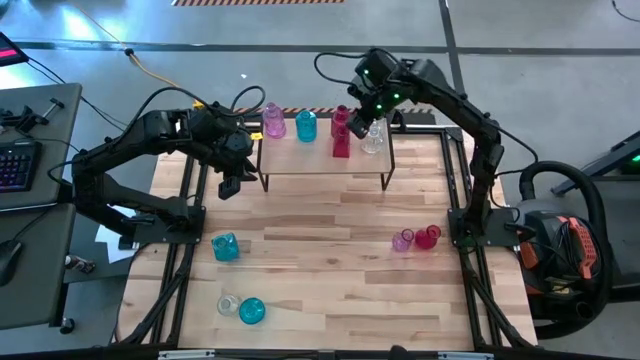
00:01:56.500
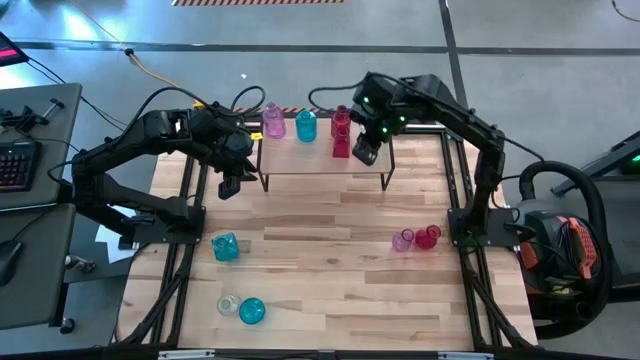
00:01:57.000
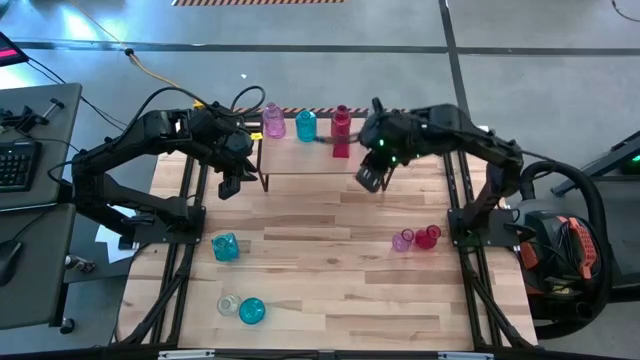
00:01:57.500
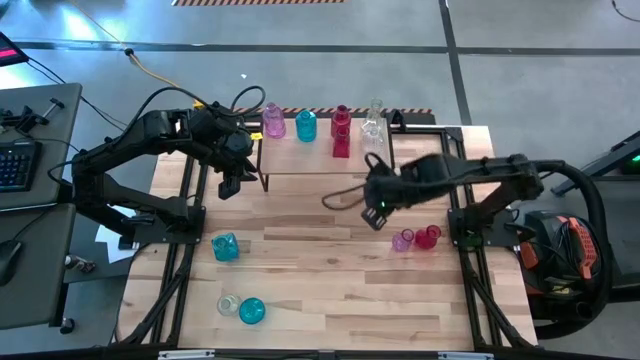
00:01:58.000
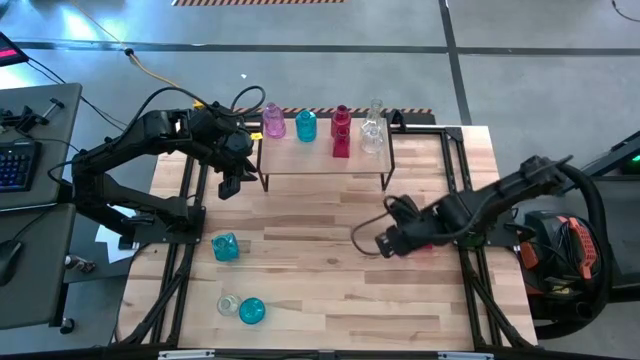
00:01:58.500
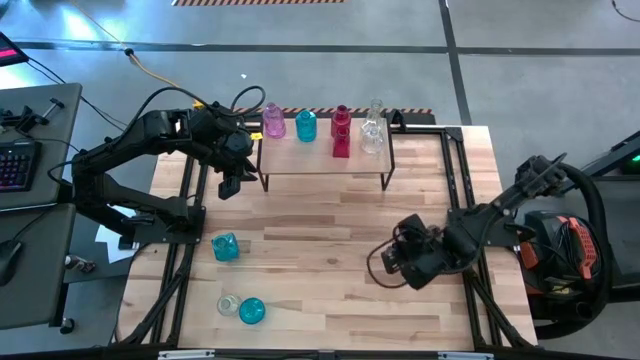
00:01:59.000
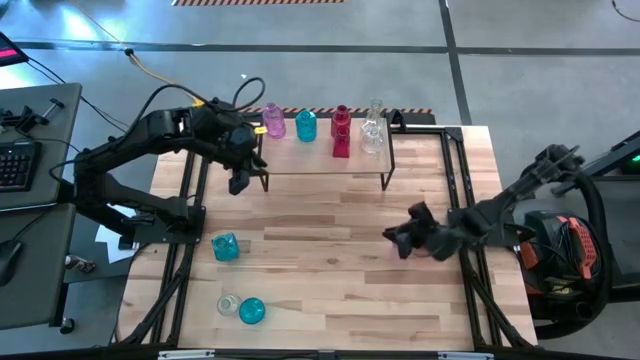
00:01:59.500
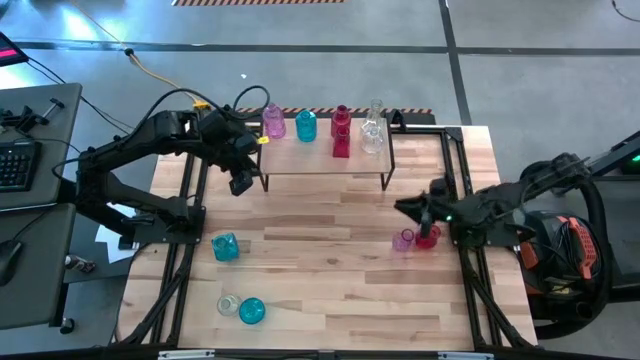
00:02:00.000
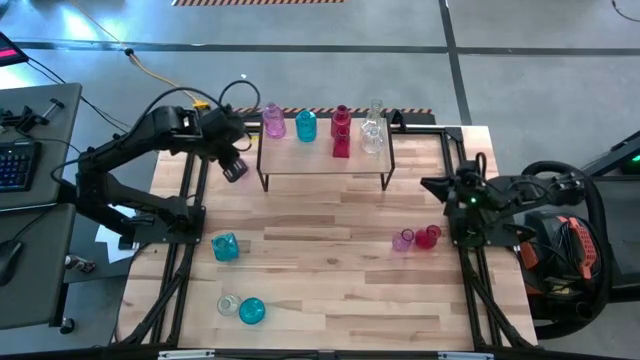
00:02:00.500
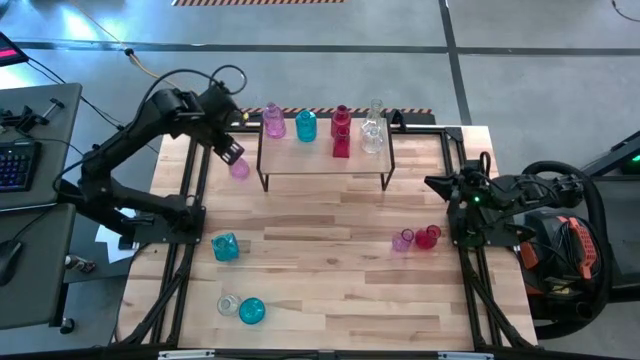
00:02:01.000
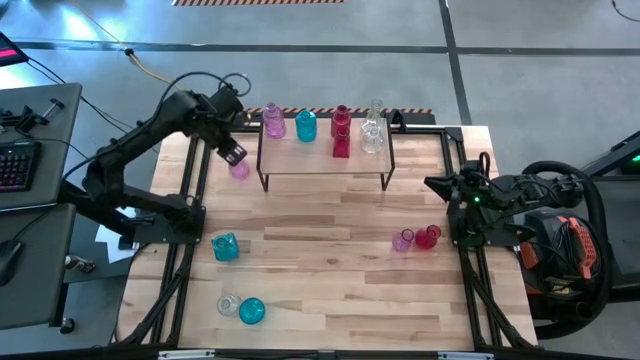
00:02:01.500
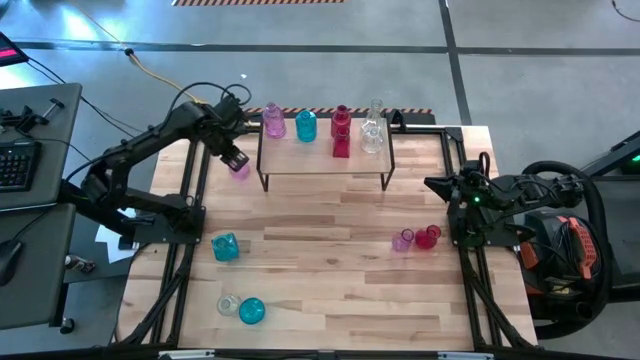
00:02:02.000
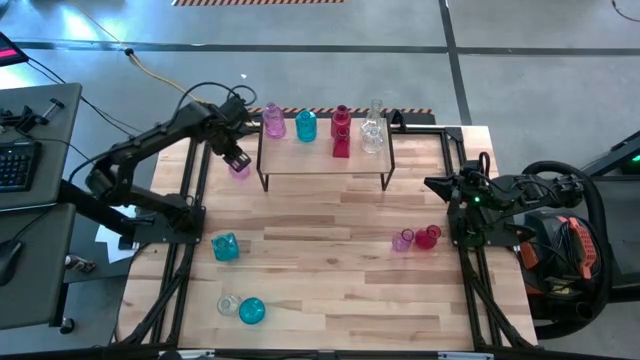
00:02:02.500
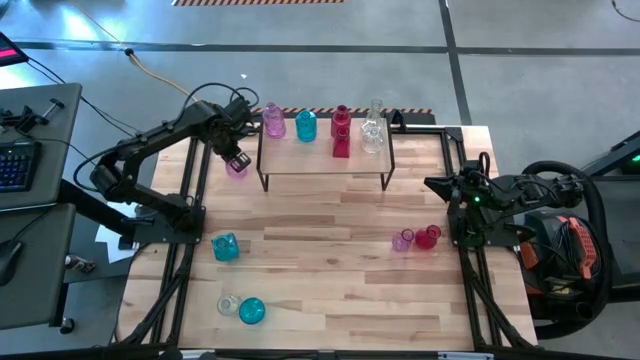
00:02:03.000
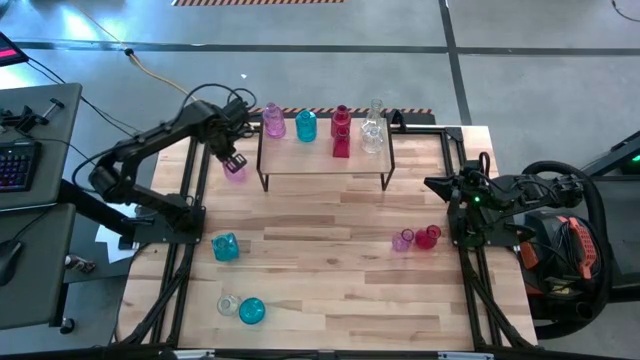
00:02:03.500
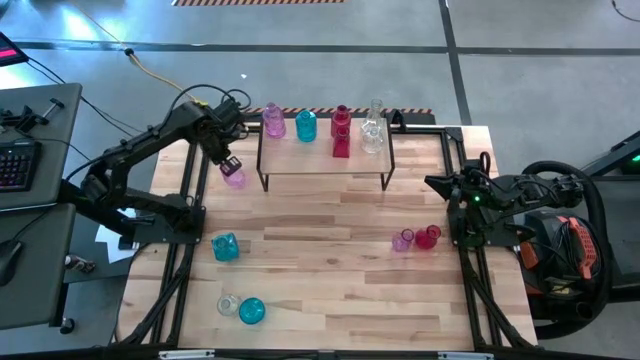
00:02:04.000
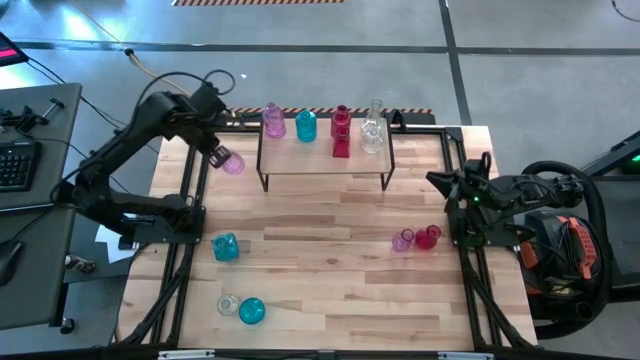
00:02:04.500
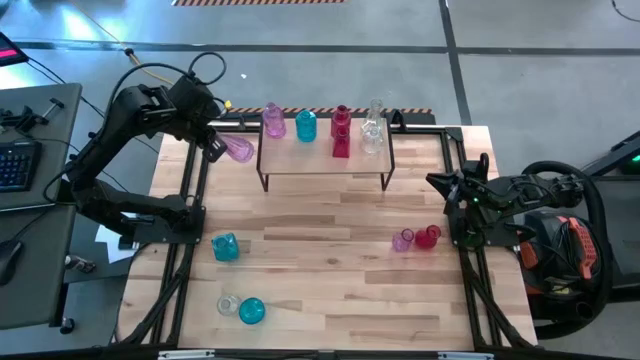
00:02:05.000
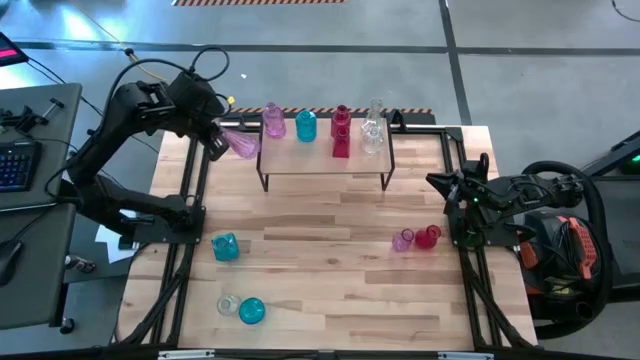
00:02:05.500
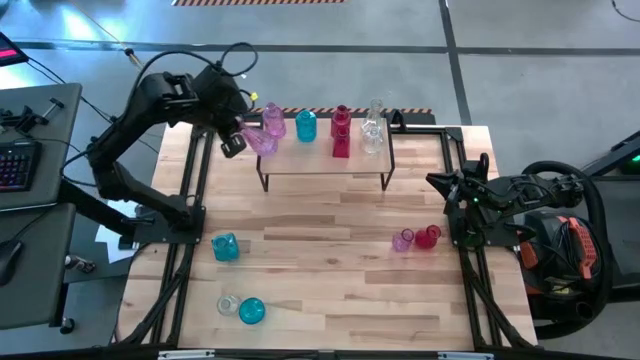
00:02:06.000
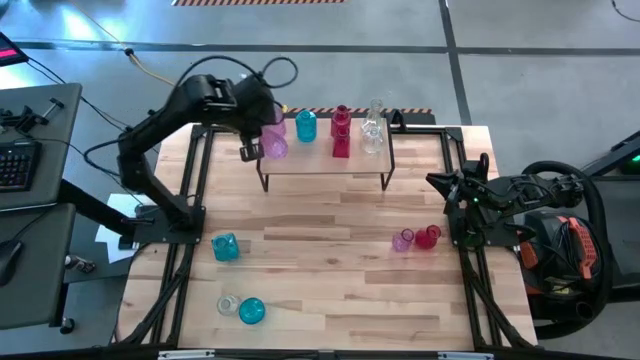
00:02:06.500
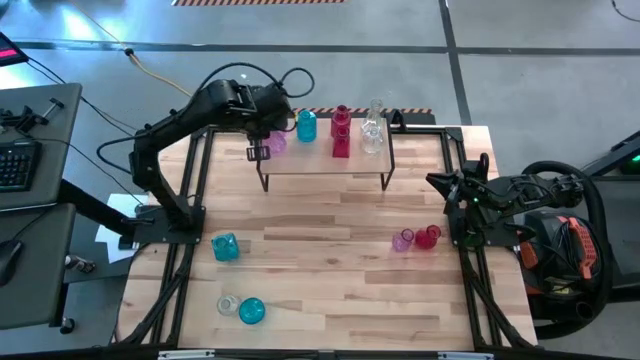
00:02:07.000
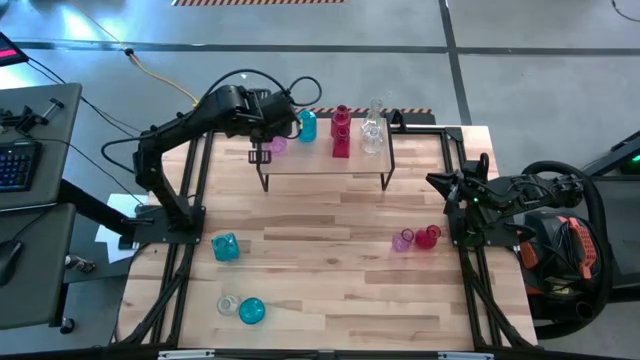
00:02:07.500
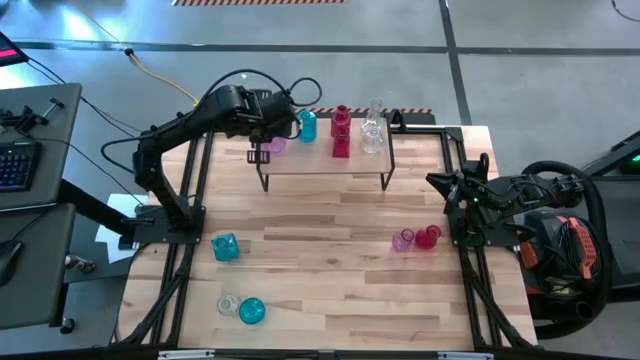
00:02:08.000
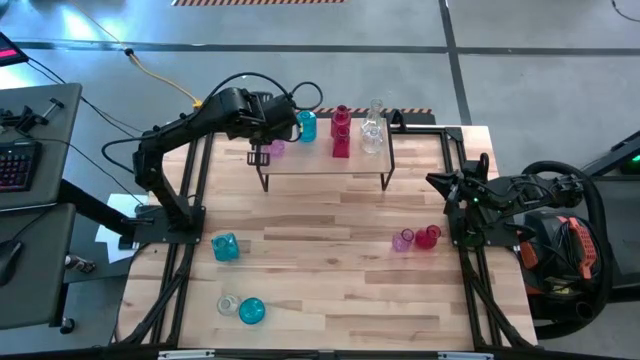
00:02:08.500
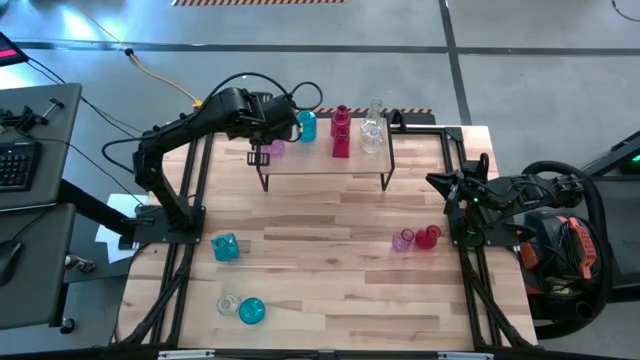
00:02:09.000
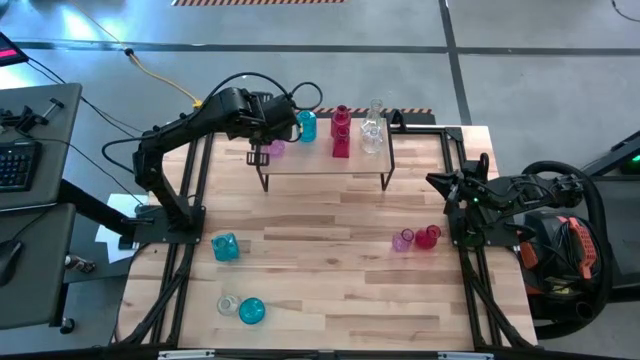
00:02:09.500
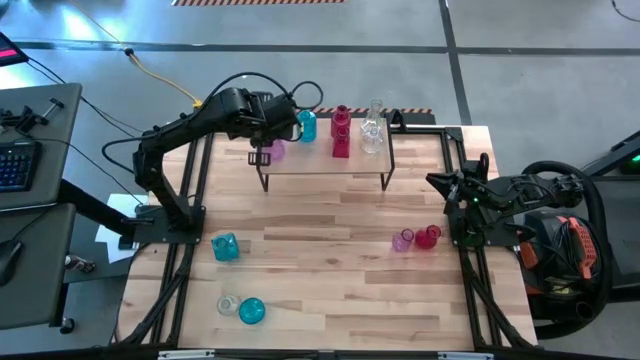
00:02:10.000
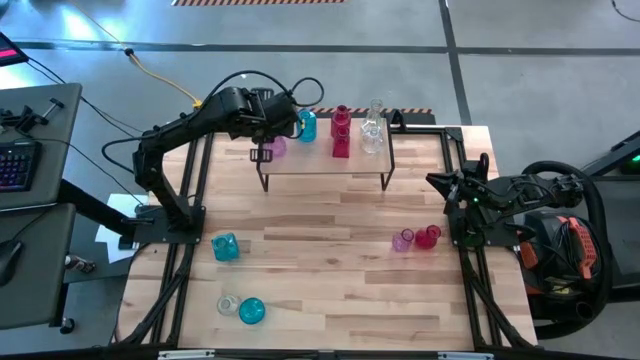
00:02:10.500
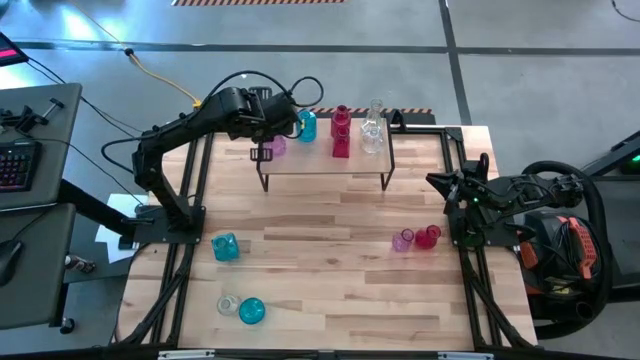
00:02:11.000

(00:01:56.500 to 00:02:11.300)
Task: sort vases onto shelf
Put the top violet vase on the shelf aligned with the other violet vase

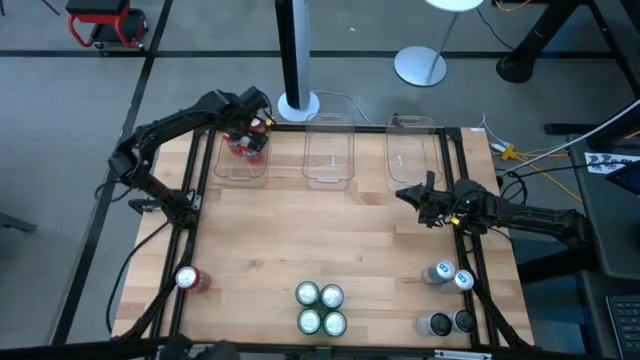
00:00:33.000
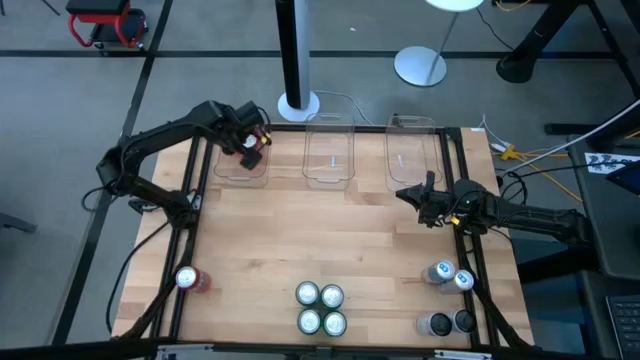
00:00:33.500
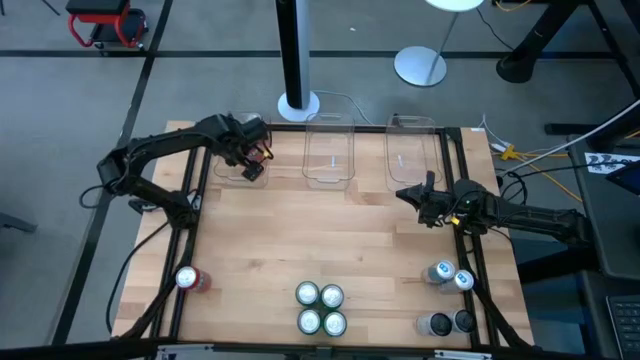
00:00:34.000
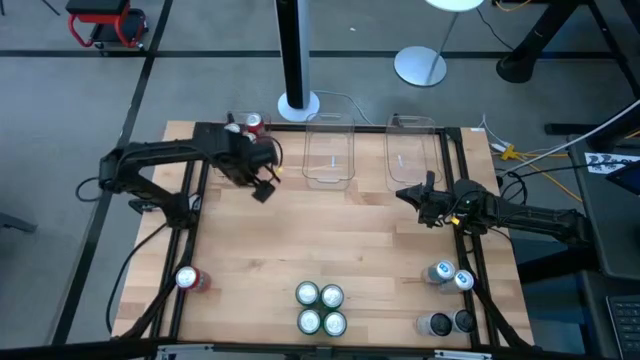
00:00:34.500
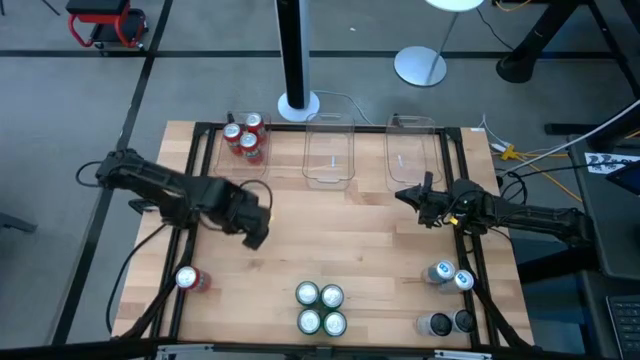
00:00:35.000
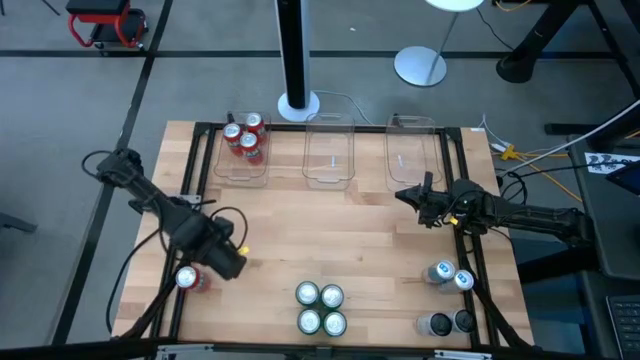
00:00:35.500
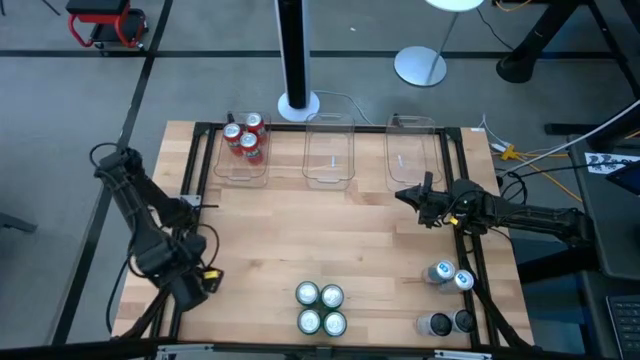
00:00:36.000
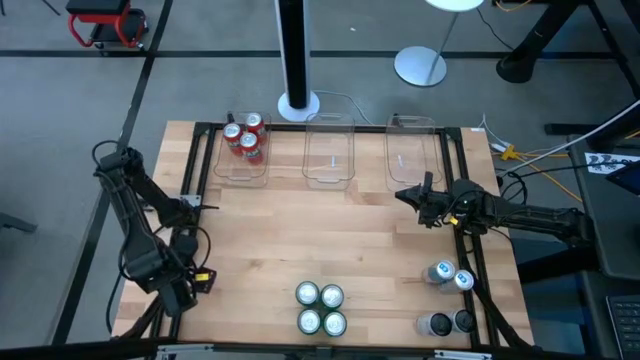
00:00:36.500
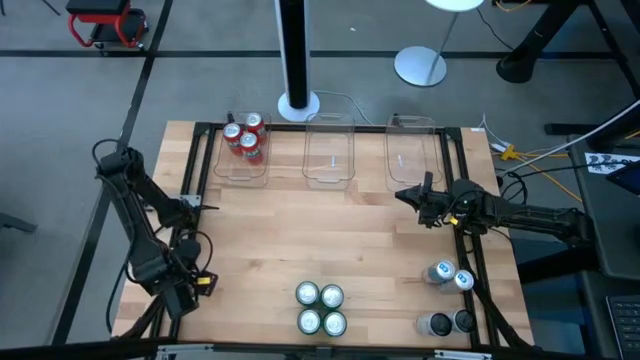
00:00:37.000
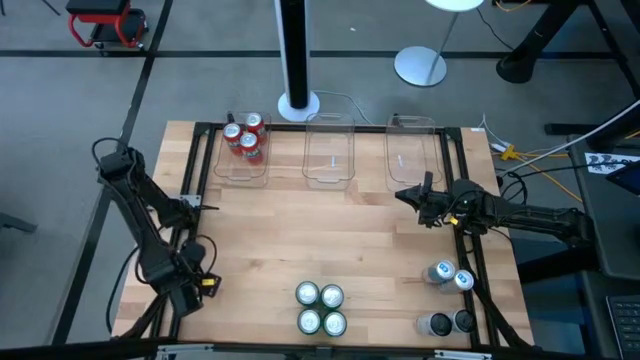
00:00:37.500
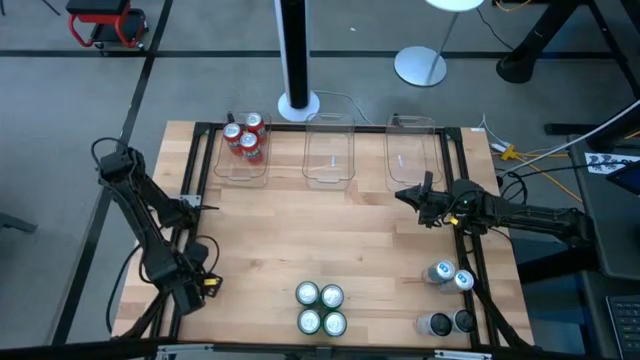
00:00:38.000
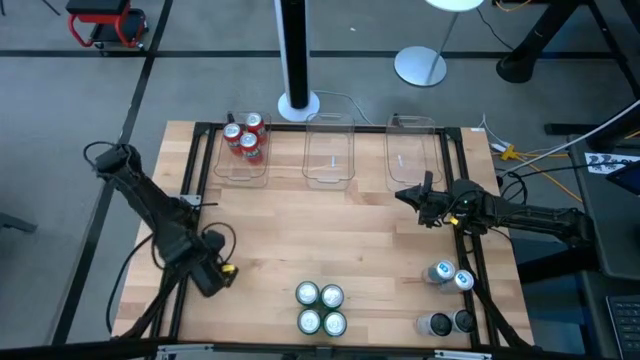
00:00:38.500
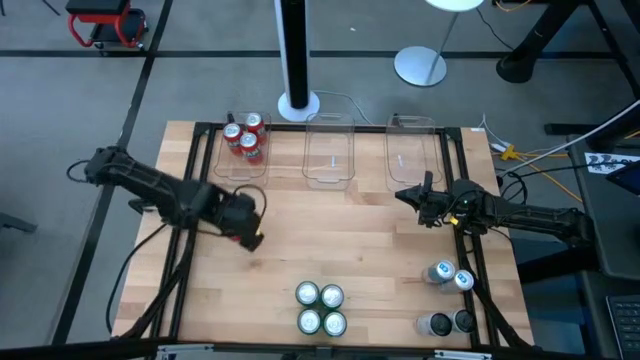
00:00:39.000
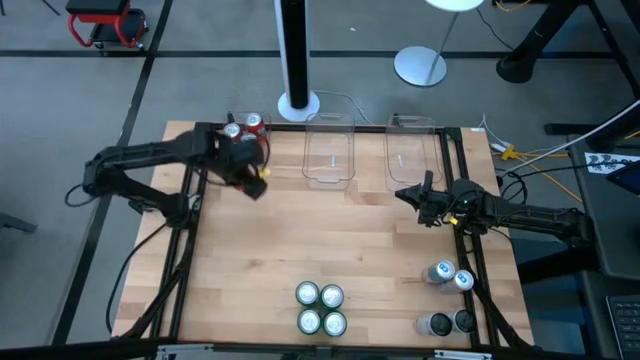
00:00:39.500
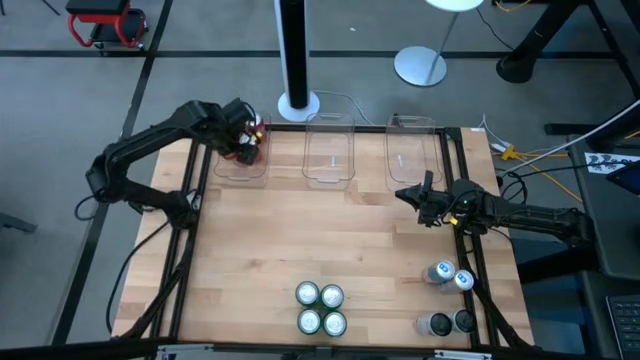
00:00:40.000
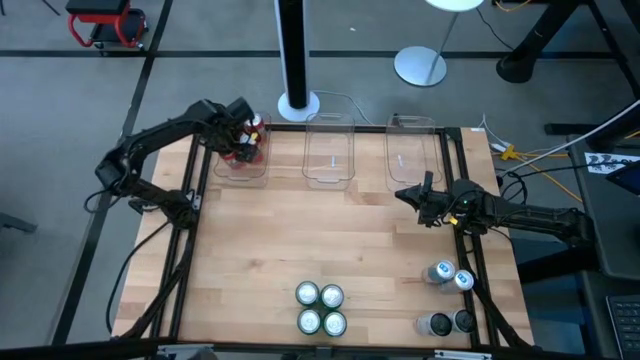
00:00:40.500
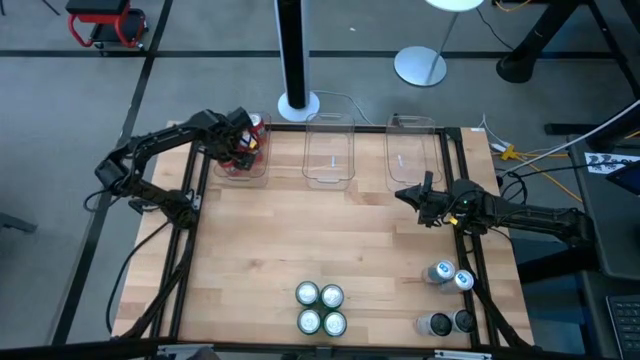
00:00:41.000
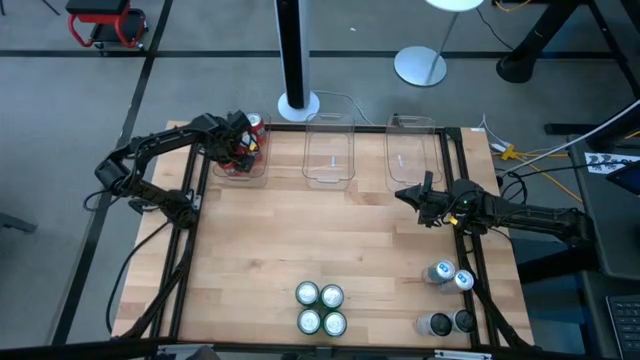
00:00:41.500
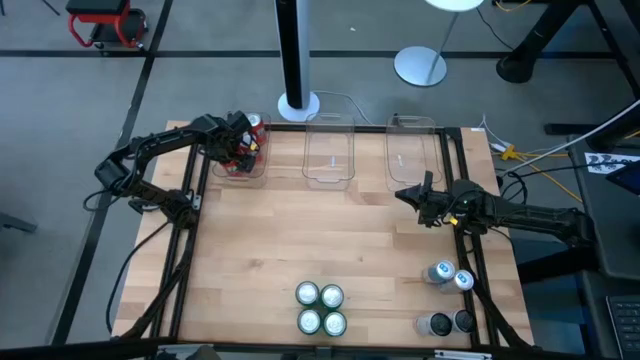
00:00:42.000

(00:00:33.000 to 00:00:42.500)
Task: Sort soda cans
Put the orange soda can into the left transparent bin
